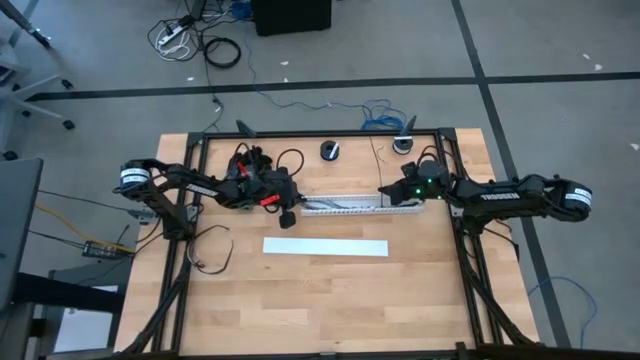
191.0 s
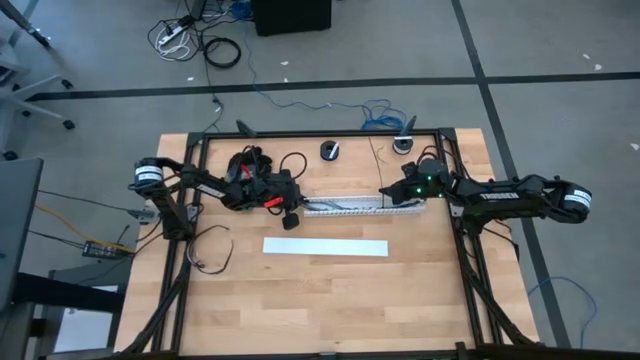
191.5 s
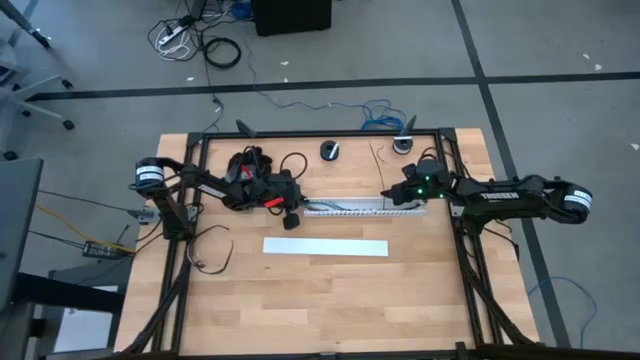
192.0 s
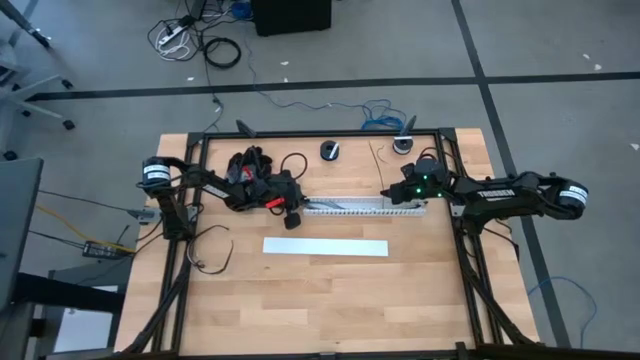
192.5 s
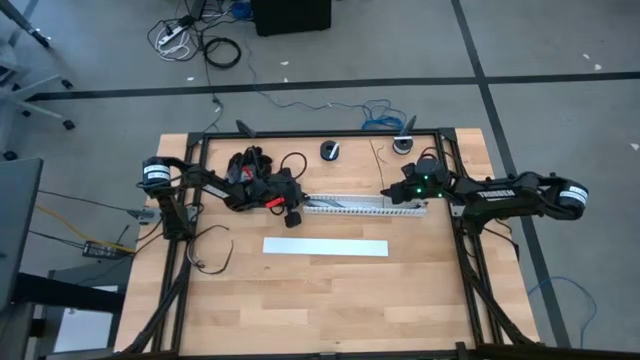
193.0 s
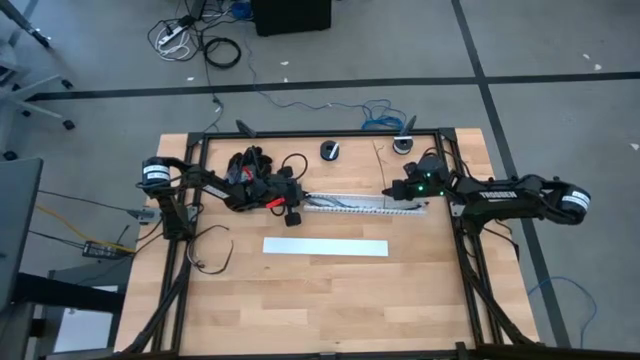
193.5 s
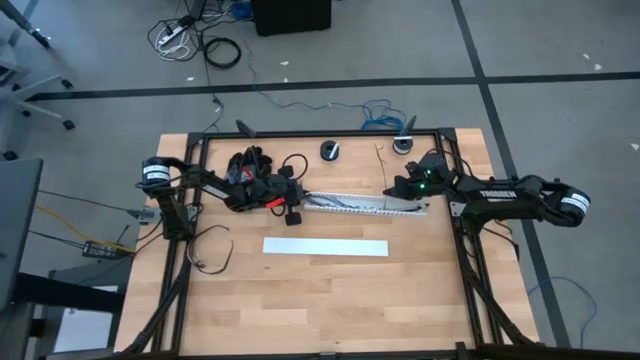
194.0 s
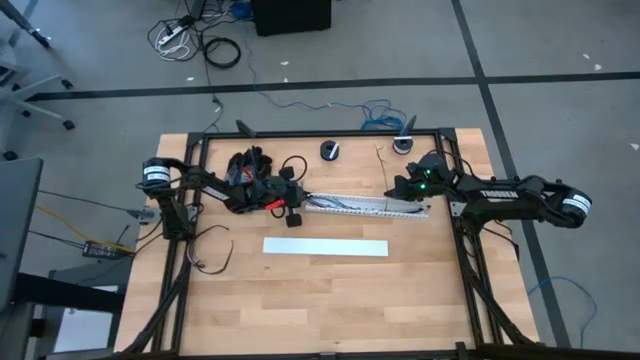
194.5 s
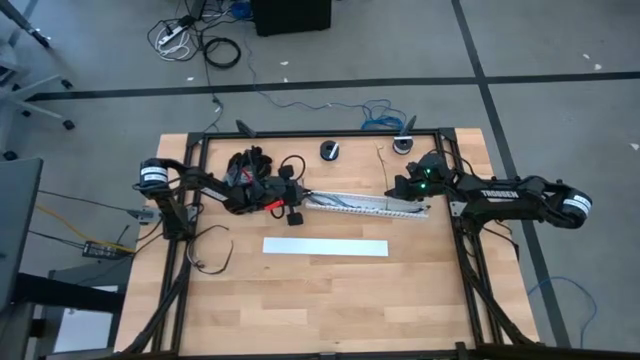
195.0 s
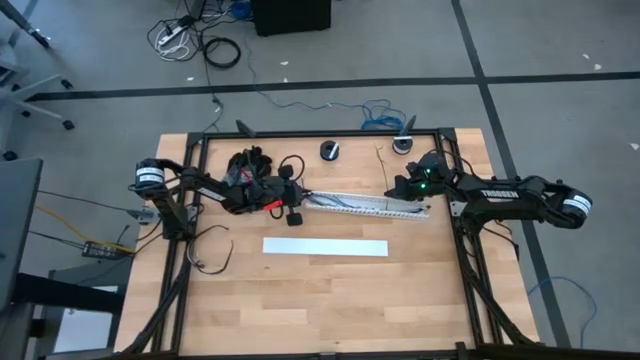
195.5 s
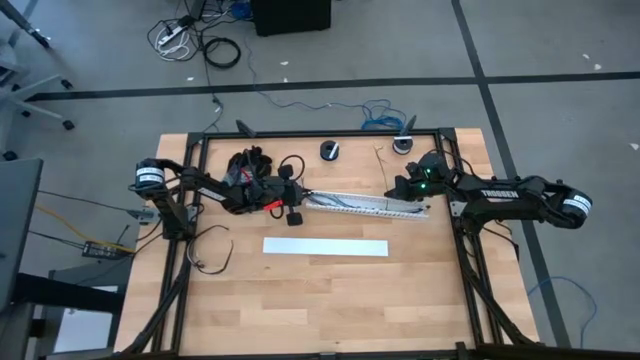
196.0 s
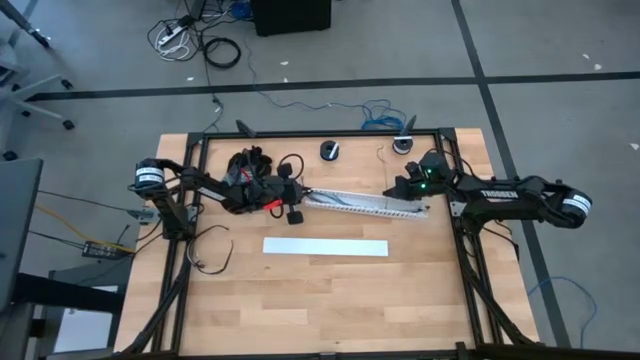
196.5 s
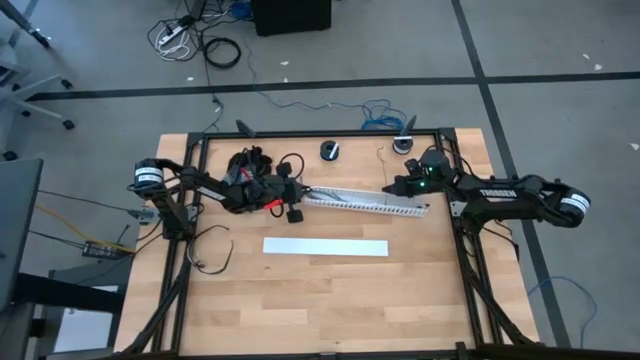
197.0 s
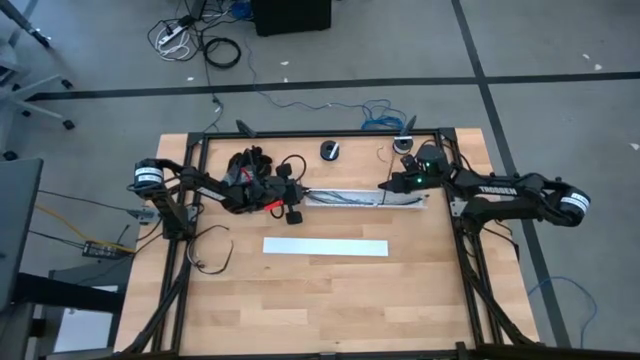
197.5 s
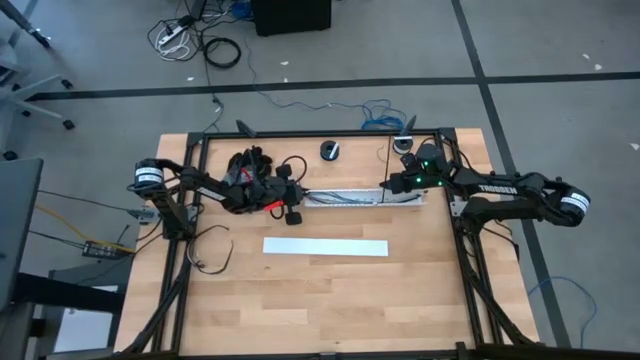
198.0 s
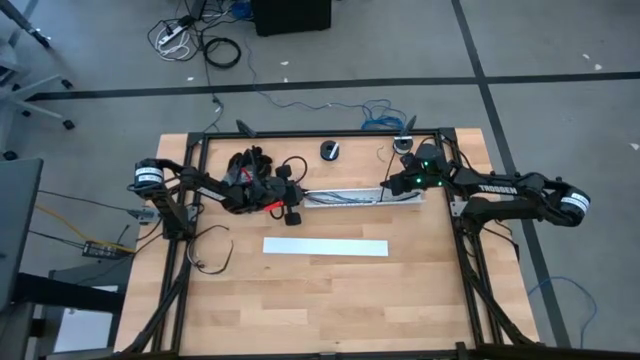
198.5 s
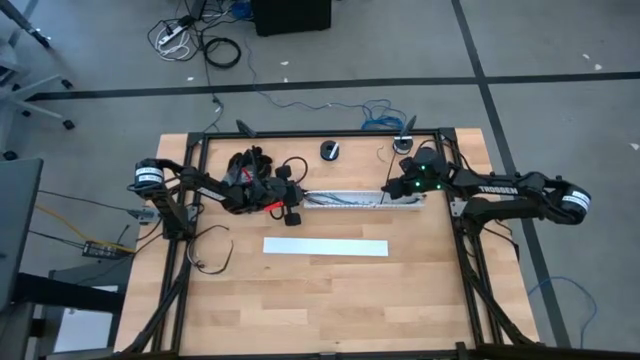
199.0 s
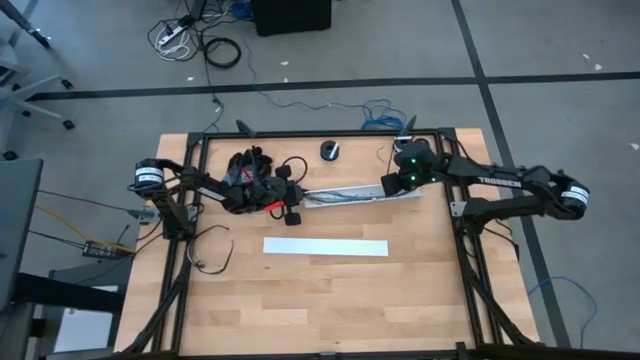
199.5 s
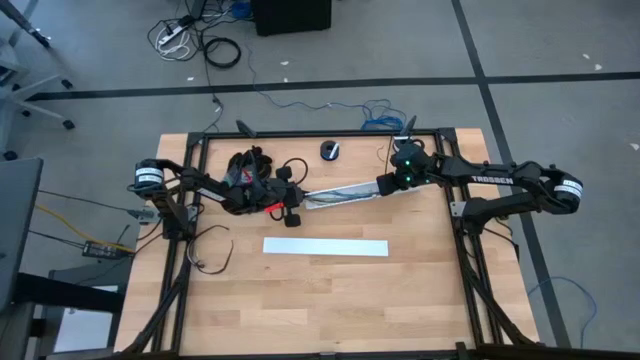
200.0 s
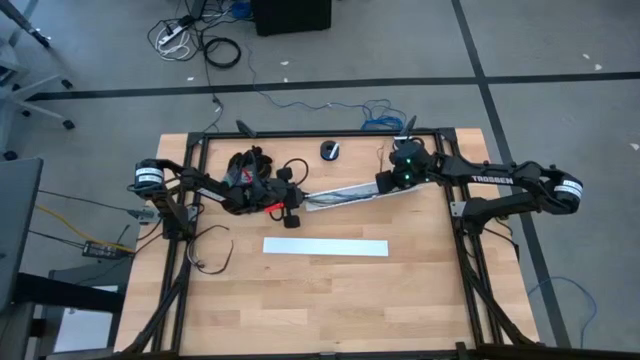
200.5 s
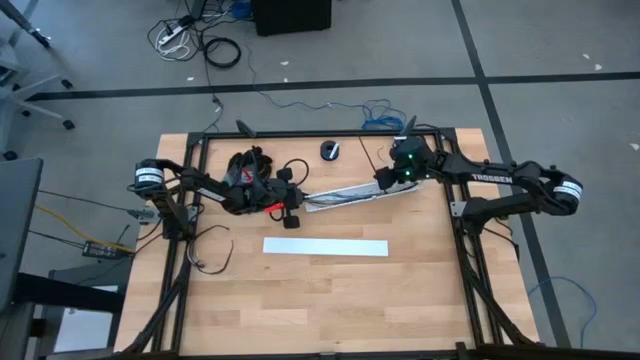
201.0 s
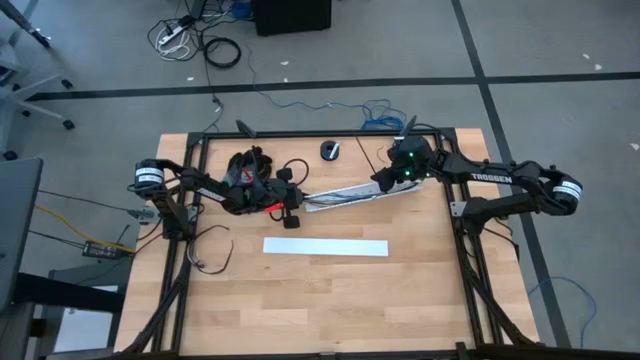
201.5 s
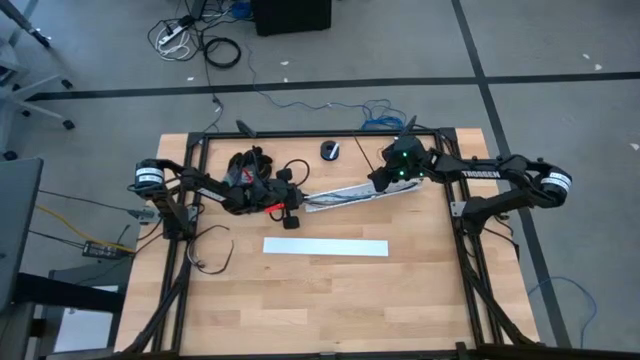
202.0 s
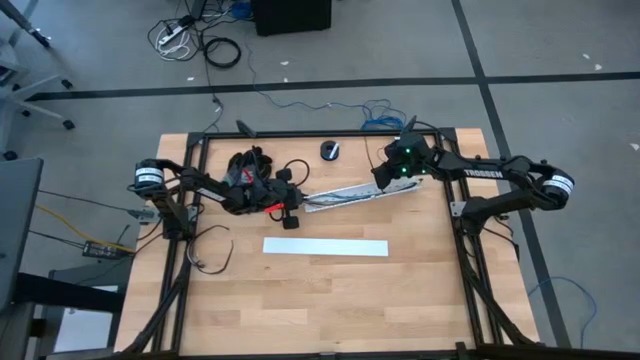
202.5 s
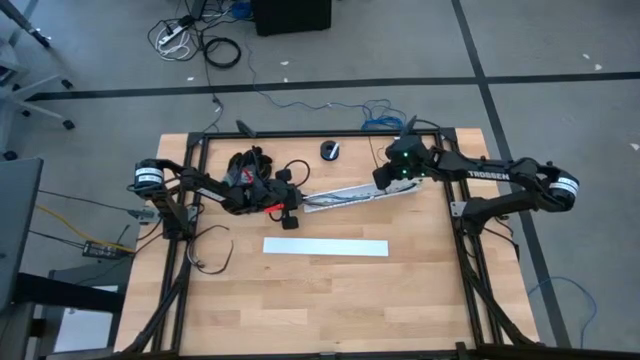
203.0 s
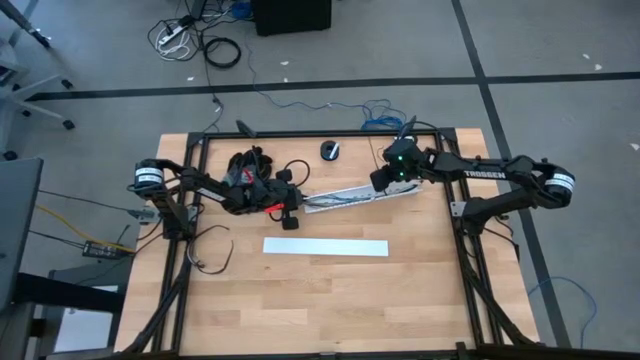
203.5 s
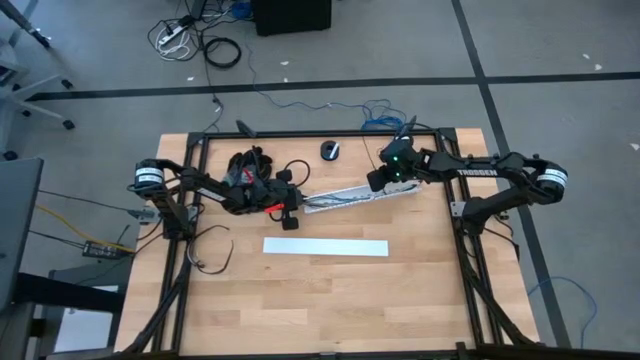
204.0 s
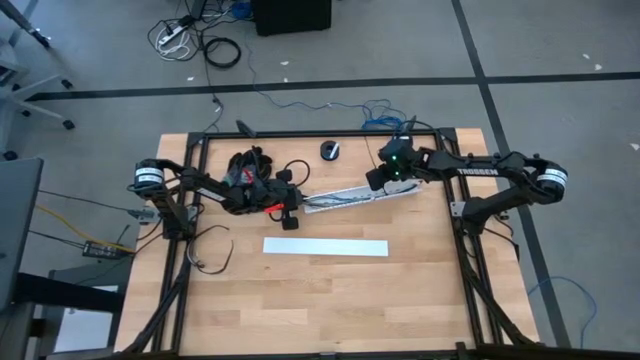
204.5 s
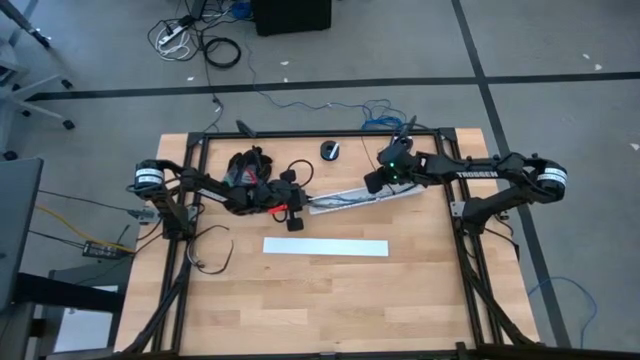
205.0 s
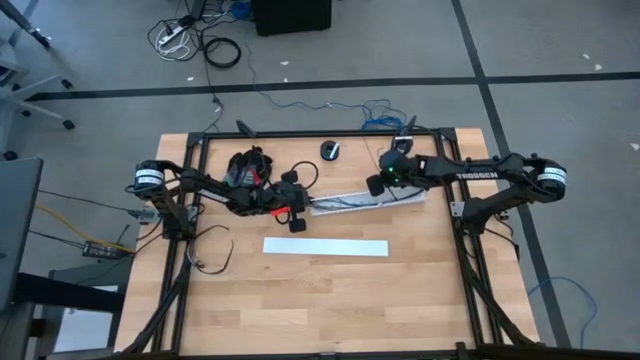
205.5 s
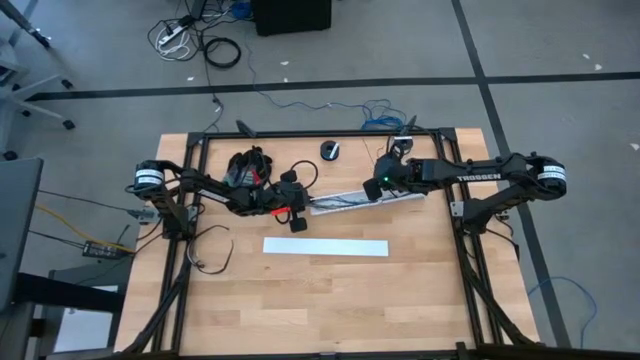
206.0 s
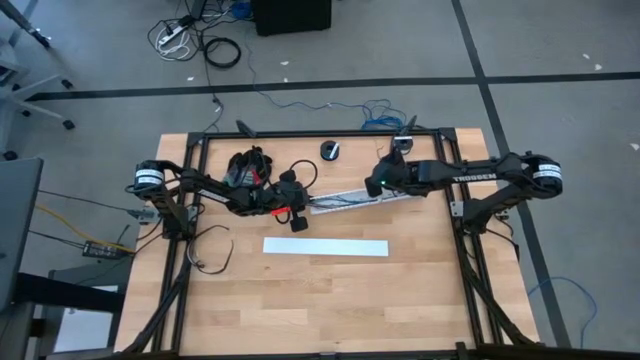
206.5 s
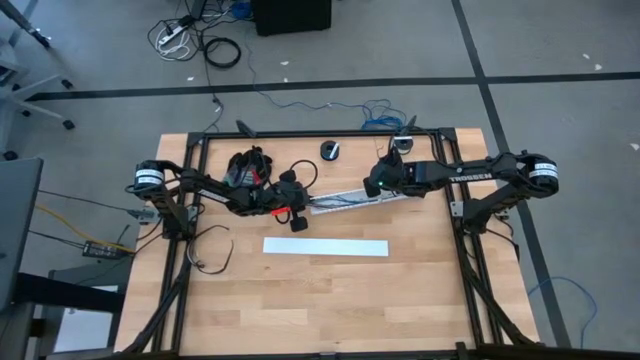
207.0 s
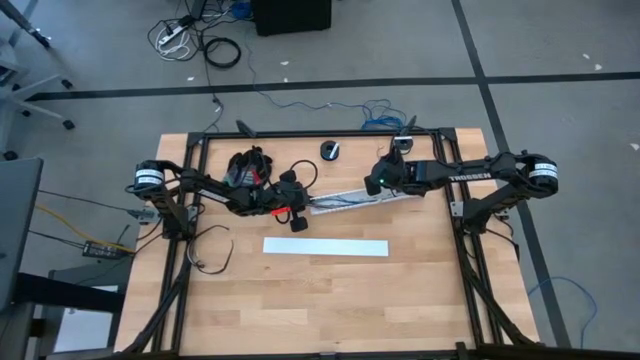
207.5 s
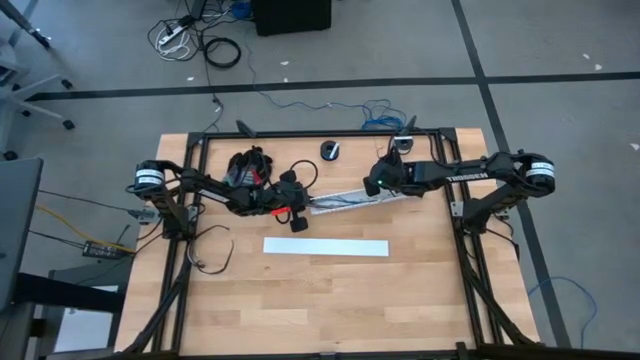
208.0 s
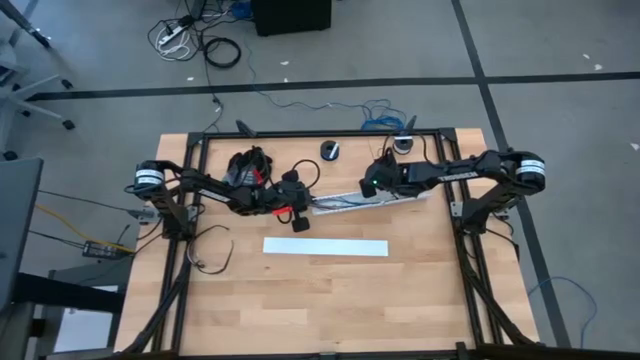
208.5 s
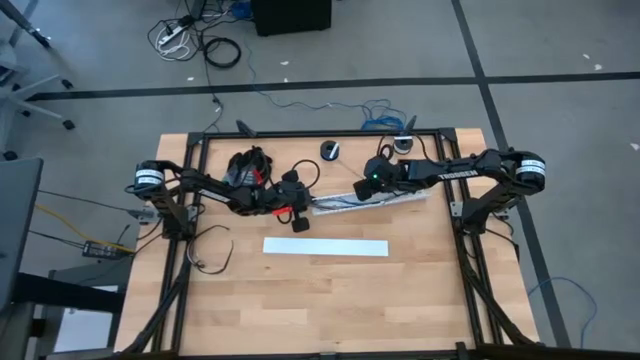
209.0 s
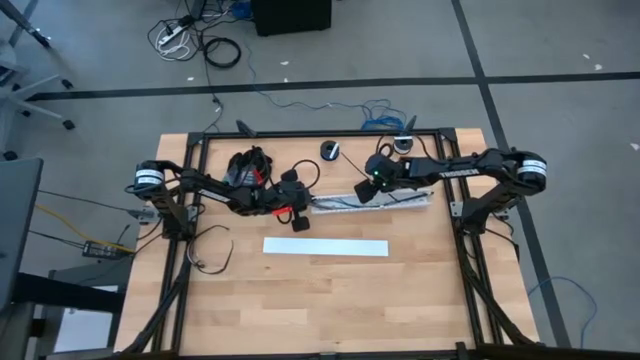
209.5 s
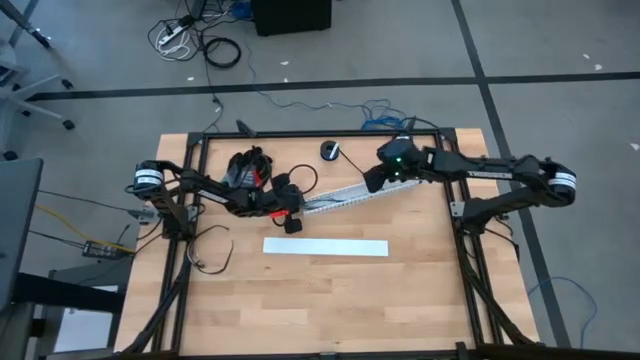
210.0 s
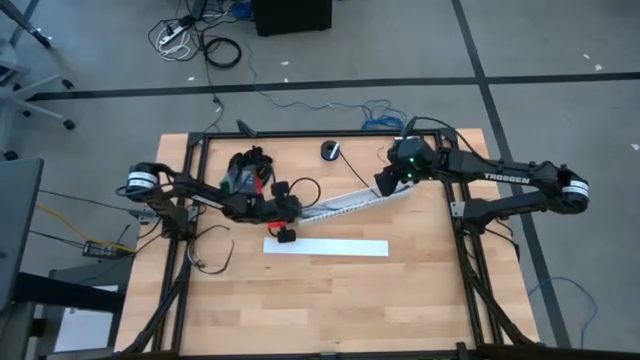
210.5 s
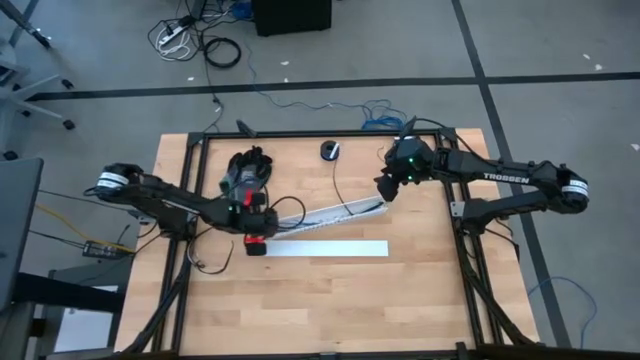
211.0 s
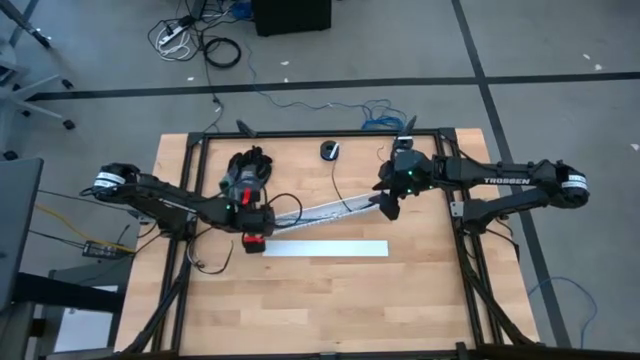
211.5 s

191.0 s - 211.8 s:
Task: Ziptie cables
Put the ziptied cables into the white cable duct
